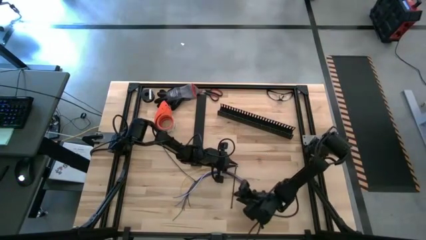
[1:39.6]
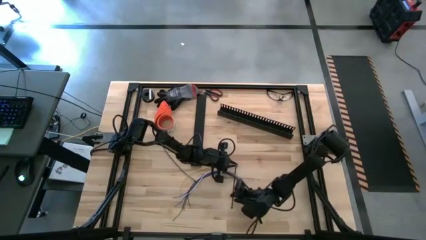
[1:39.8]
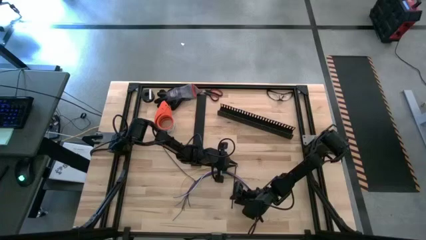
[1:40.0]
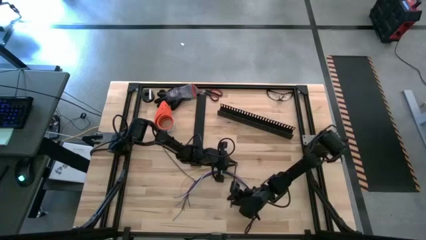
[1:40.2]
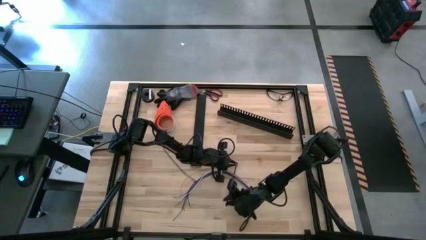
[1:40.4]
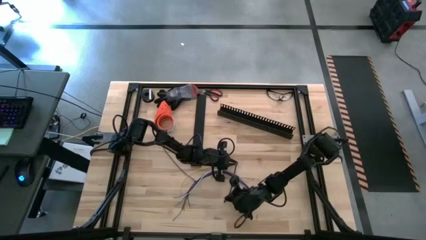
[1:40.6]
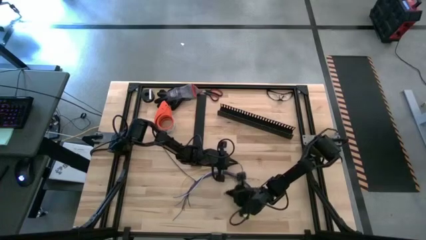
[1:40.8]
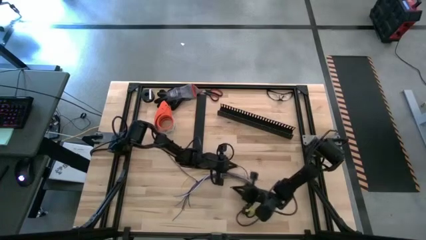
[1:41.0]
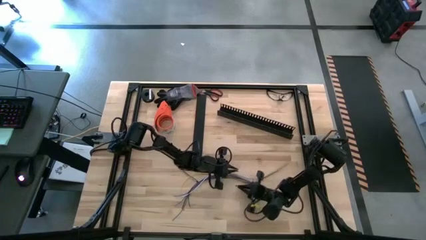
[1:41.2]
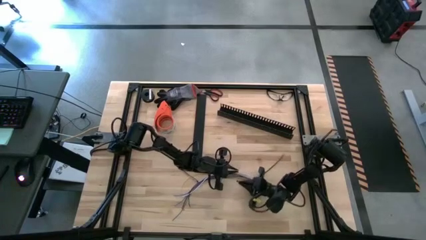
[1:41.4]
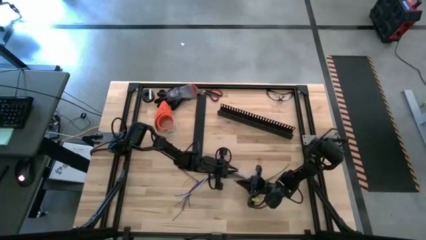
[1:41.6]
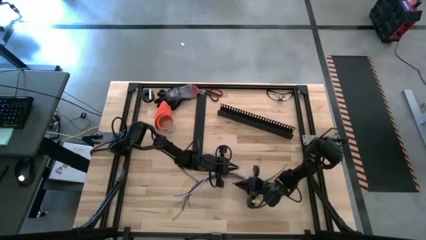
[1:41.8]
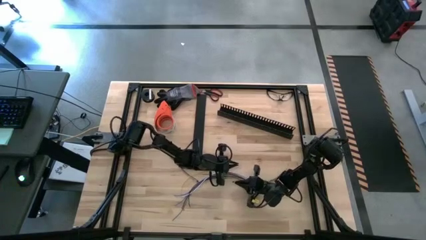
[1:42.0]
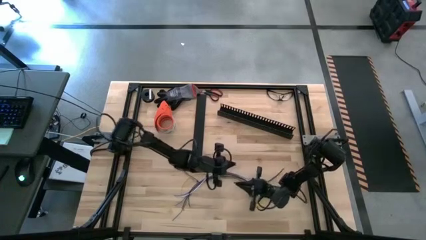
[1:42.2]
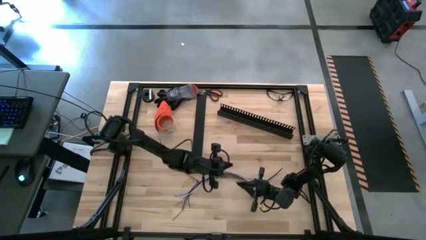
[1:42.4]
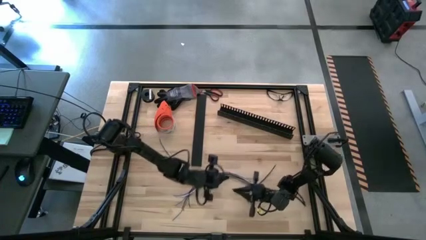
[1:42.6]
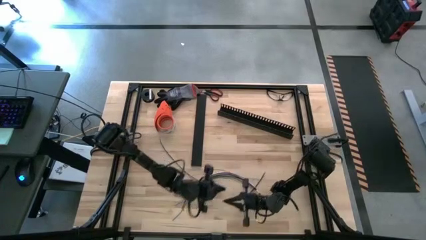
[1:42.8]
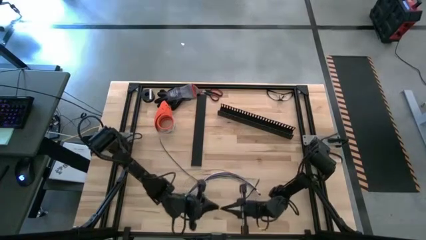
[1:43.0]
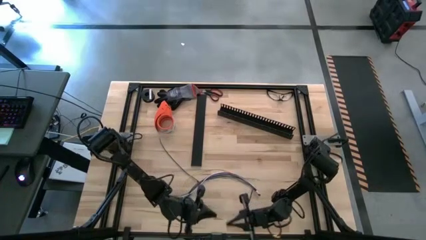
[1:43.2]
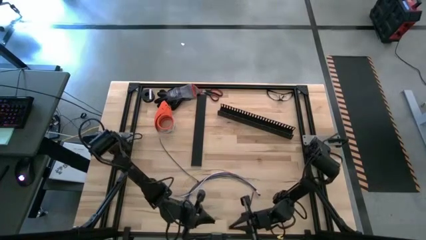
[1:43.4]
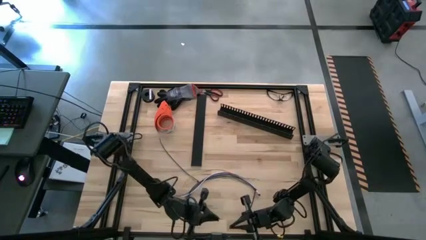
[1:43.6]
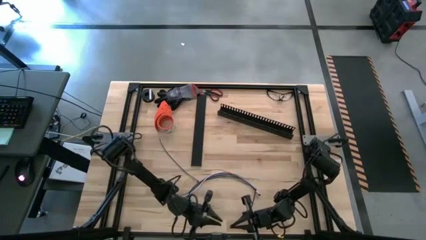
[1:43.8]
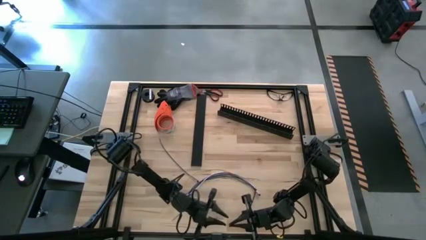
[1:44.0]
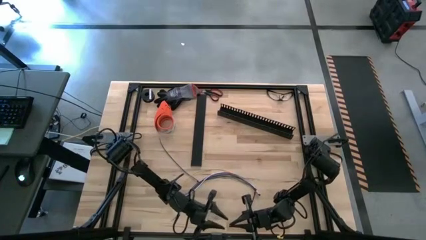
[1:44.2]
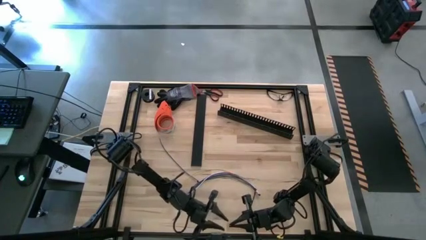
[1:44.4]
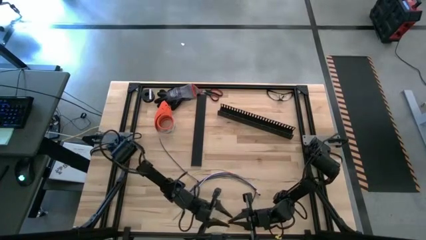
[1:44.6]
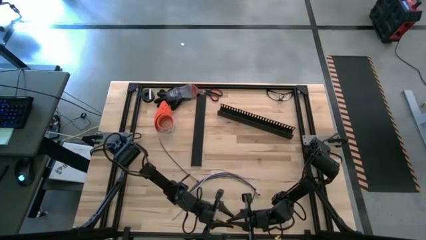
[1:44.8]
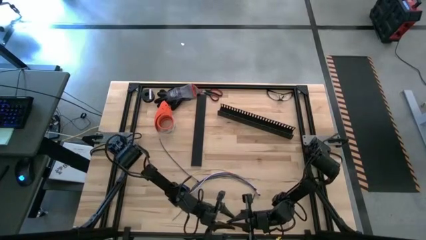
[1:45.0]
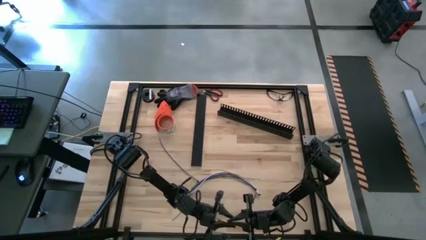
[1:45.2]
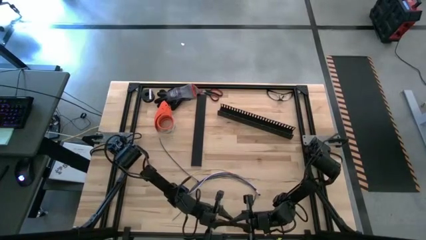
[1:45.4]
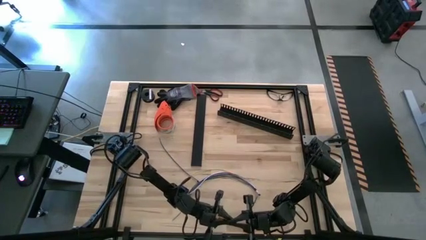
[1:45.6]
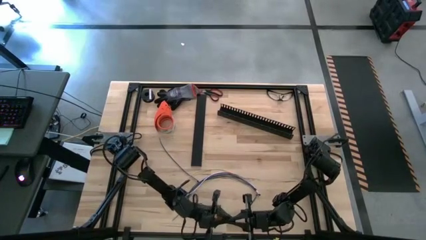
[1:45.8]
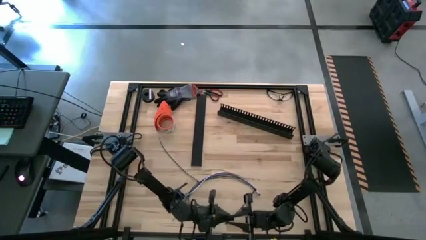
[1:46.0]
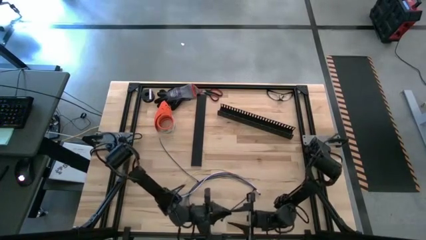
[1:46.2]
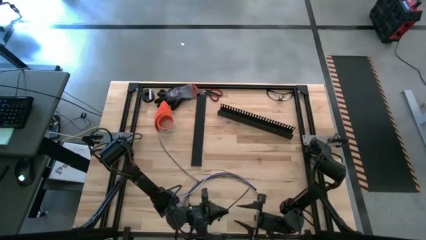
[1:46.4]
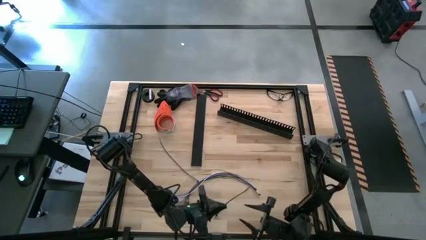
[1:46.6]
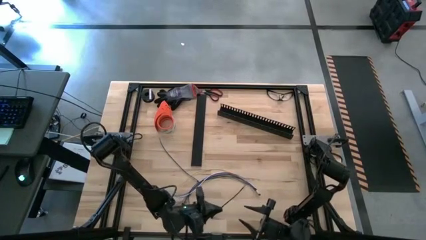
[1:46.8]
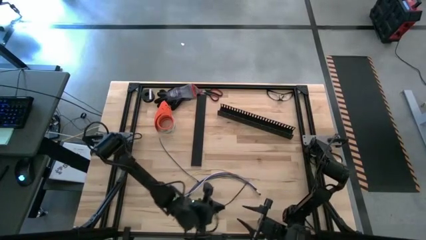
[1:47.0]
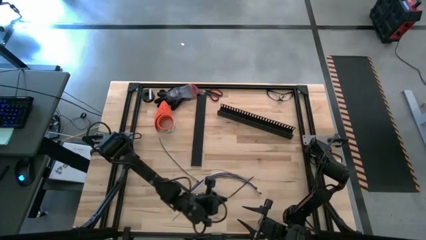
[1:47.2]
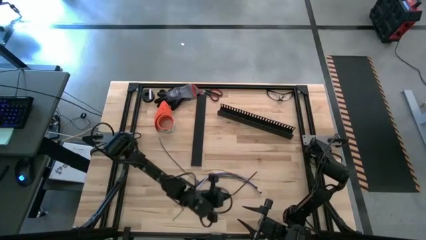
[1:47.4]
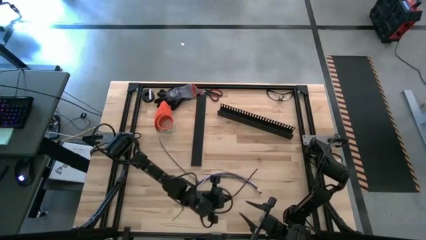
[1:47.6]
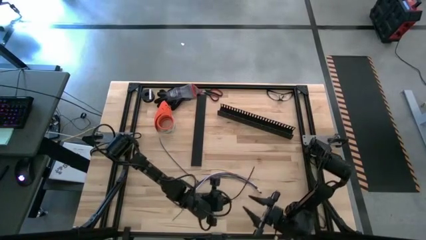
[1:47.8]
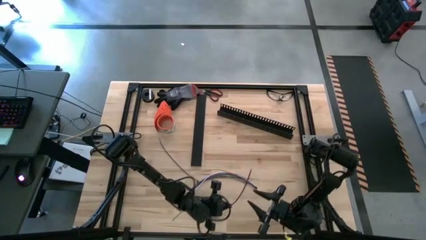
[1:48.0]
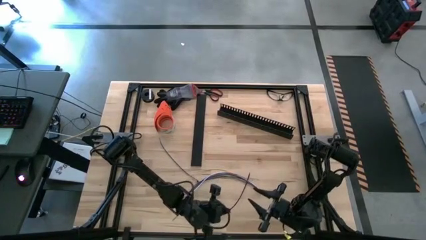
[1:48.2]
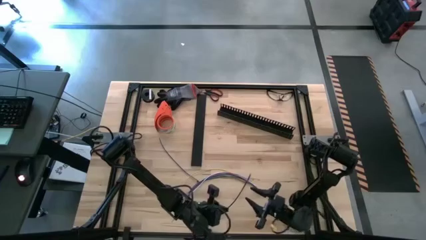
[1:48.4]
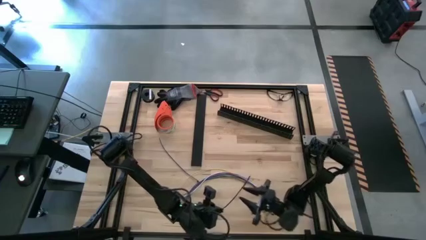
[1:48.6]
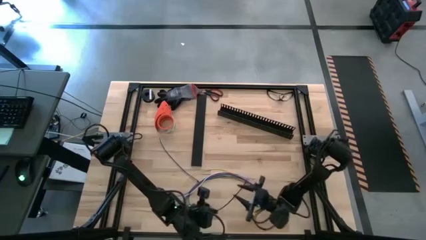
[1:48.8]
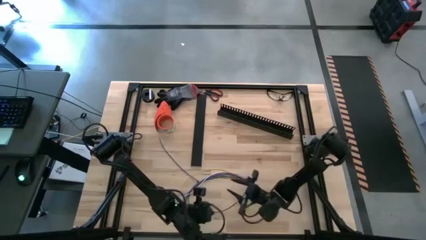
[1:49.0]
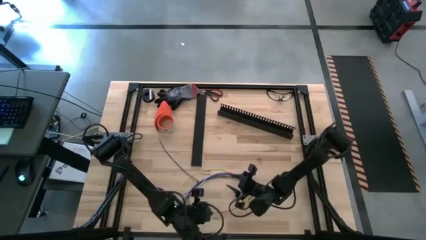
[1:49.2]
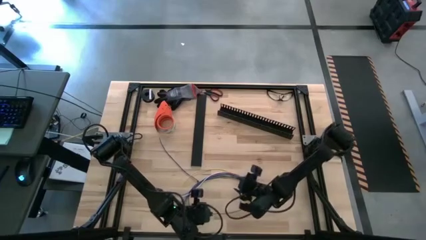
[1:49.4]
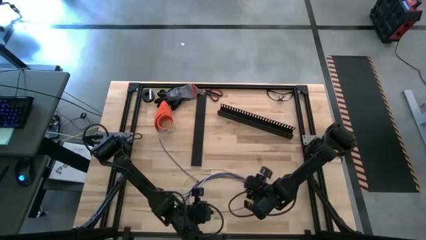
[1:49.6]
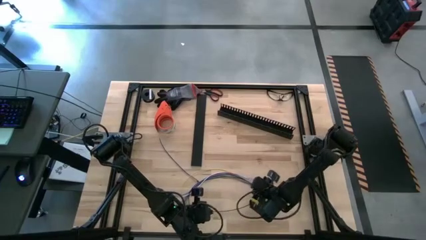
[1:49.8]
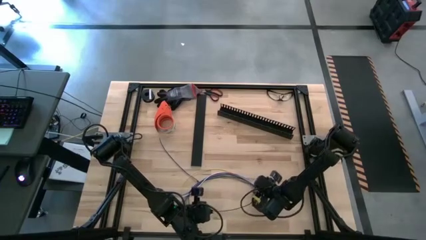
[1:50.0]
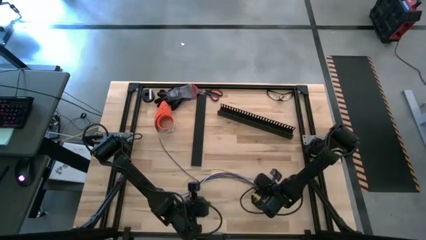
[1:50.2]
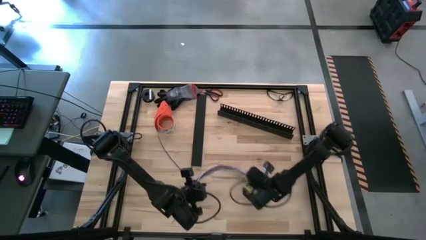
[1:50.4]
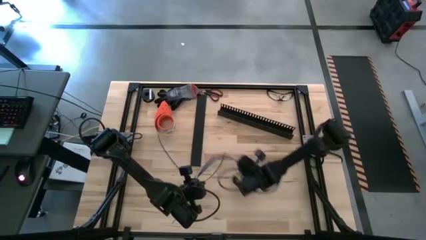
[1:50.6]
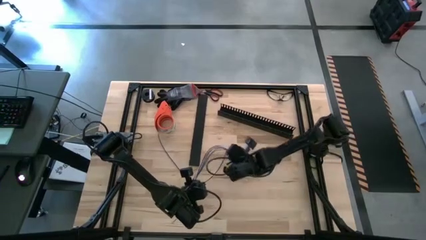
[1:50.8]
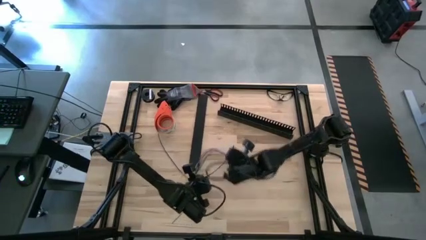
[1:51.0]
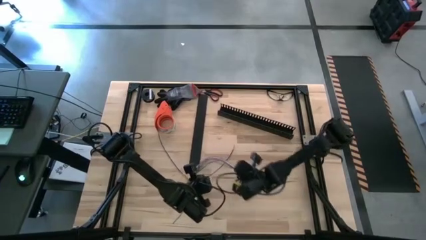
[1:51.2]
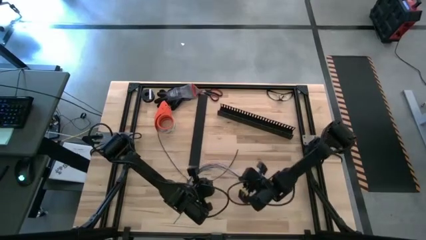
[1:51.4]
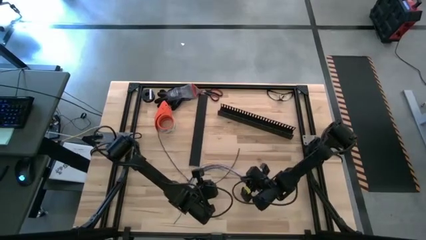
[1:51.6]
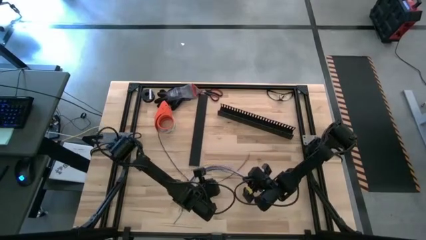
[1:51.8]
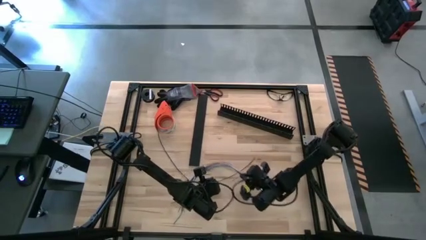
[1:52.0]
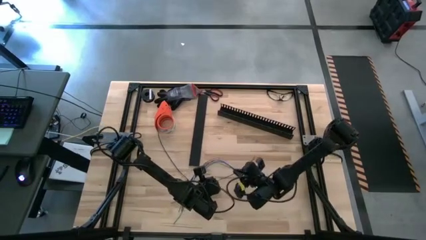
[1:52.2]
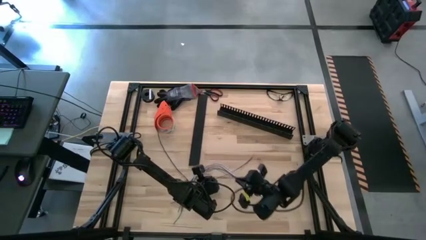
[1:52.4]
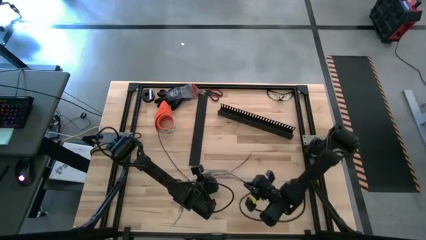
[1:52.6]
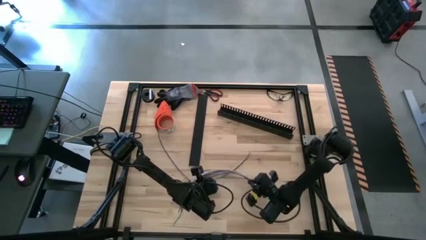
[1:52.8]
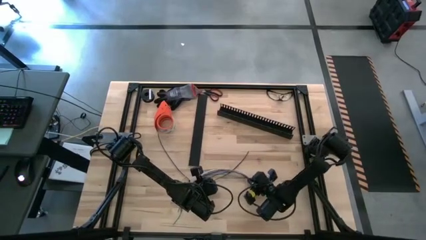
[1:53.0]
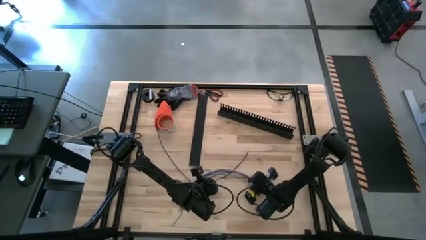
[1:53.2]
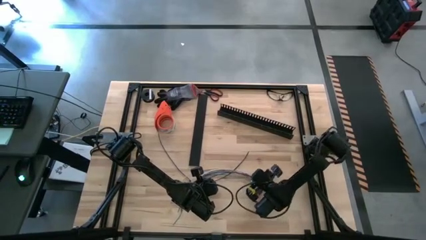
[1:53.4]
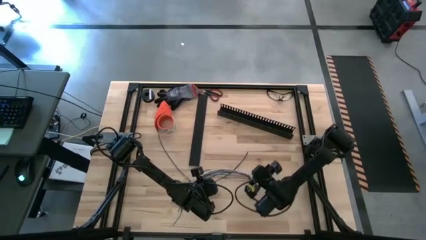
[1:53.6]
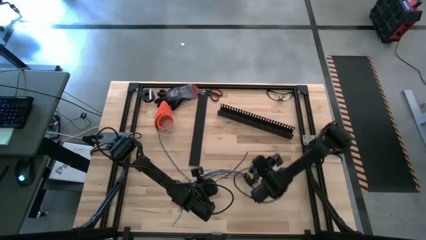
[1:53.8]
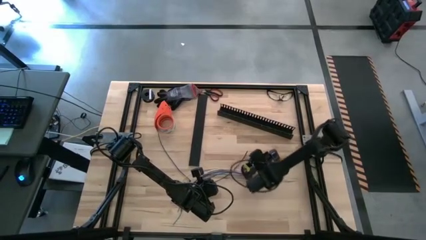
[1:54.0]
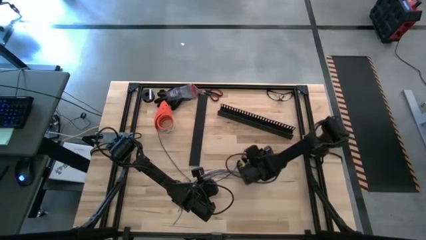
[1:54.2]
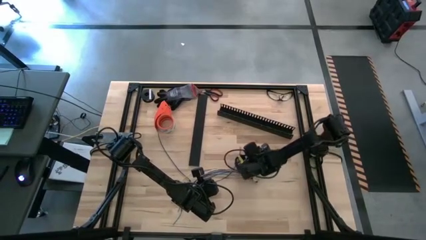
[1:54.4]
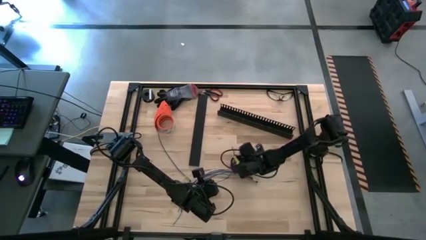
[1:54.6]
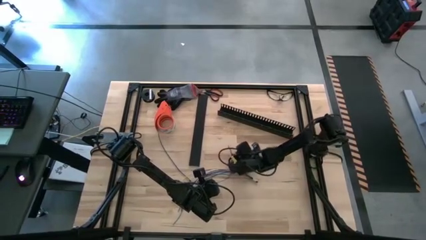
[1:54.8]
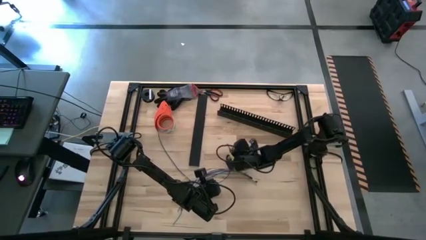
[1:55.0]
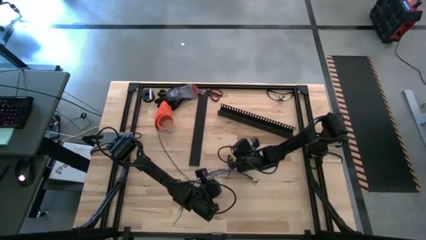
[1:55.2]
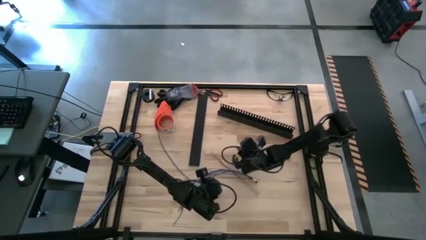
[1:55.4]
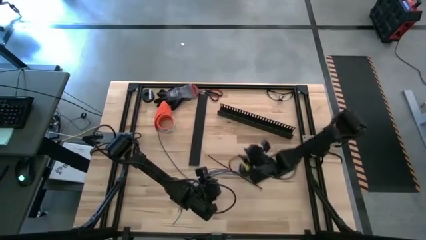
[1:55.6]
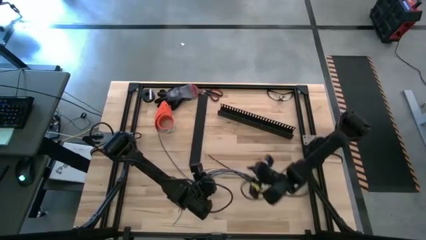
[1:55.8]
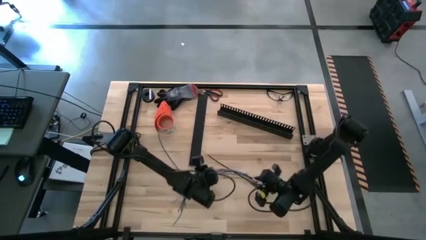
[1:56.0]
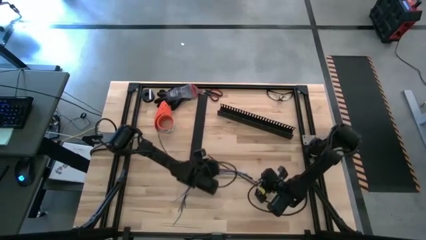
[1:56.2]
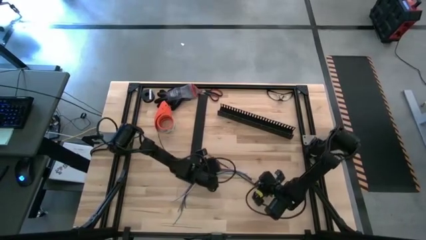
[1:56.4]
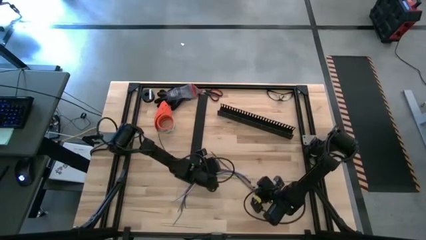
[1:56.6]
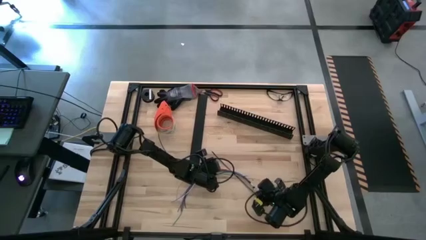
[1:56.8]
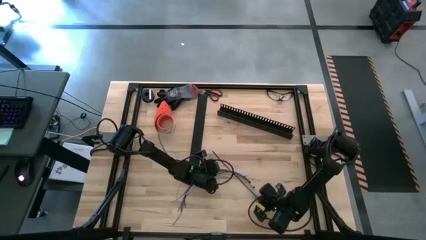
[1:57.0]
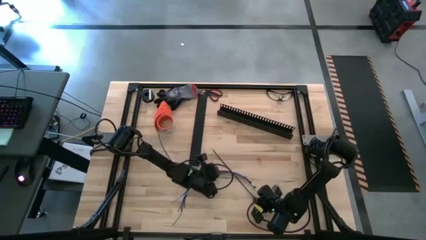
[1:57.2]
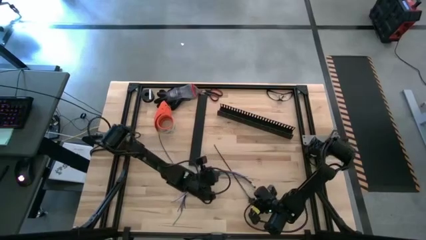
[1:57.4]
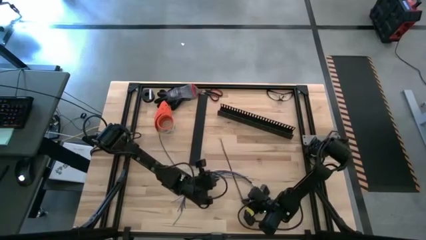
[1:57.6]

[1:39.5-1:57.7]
Task: Ziptie cables
Wrap the black zip tie on the cables
